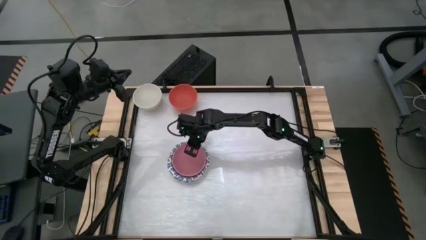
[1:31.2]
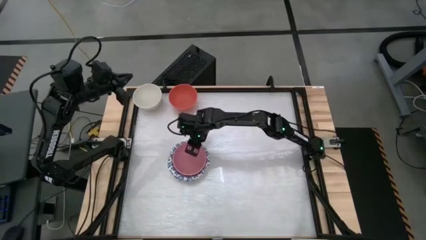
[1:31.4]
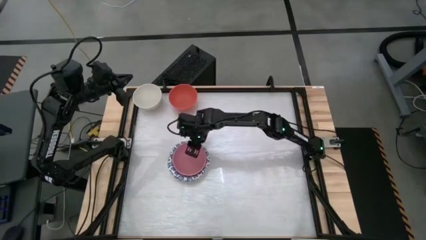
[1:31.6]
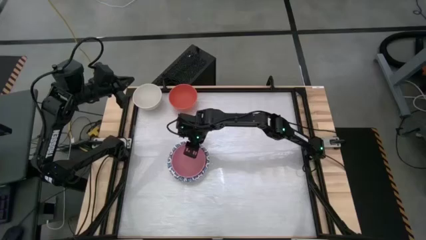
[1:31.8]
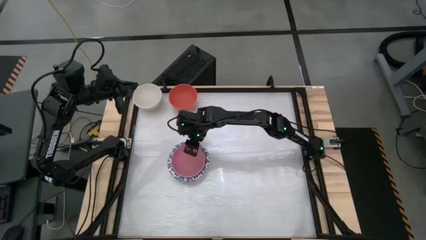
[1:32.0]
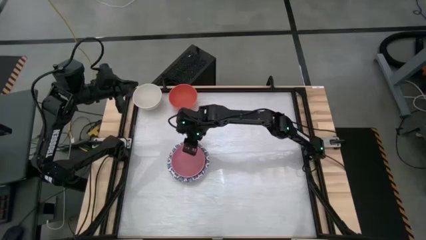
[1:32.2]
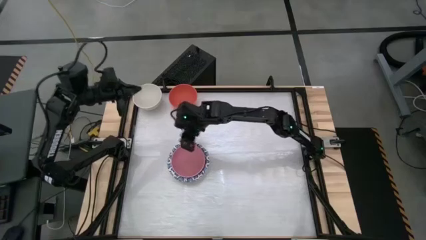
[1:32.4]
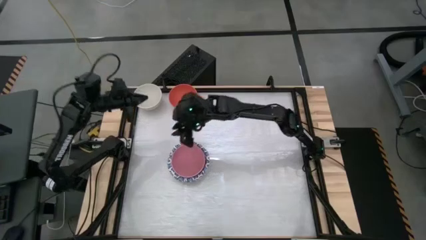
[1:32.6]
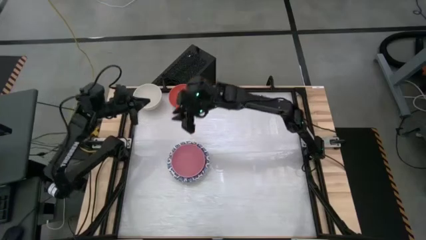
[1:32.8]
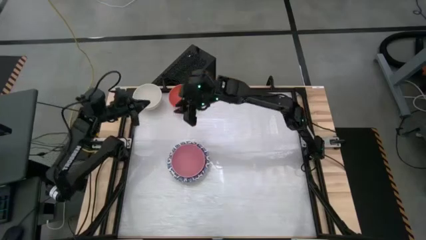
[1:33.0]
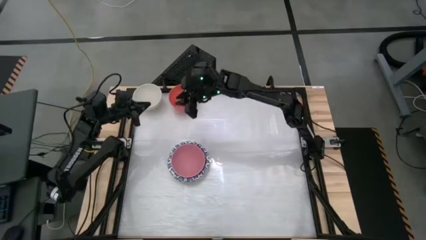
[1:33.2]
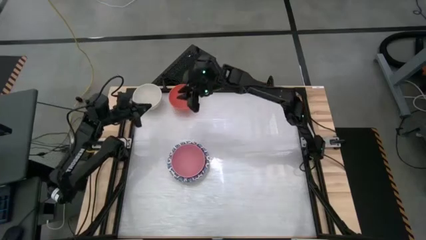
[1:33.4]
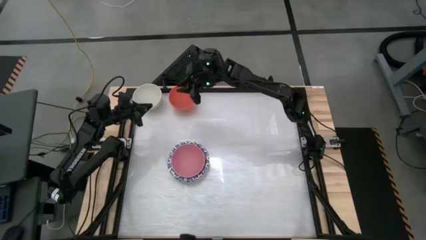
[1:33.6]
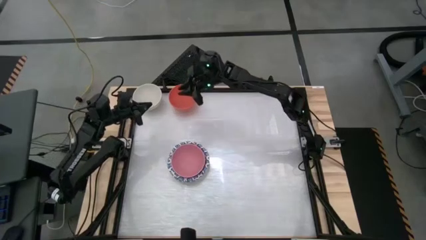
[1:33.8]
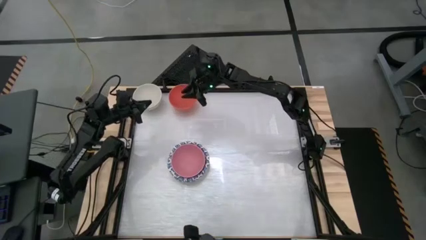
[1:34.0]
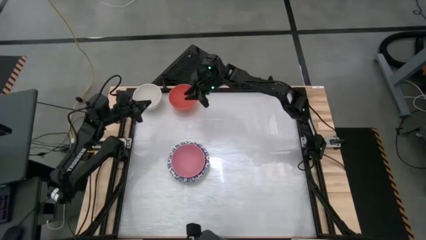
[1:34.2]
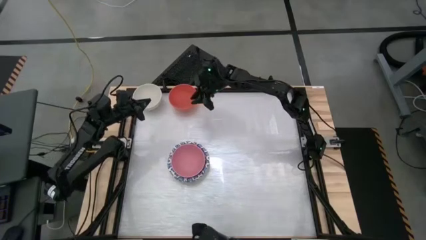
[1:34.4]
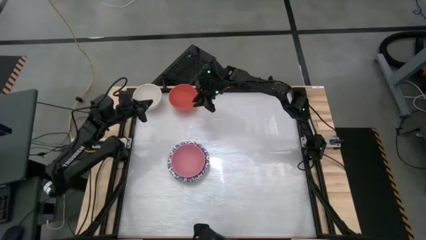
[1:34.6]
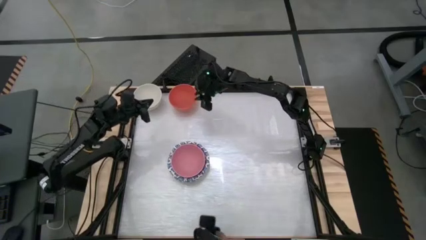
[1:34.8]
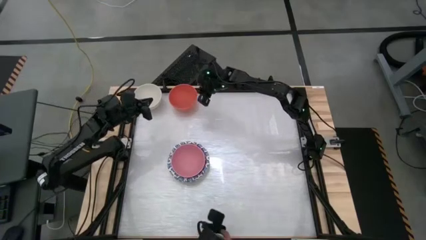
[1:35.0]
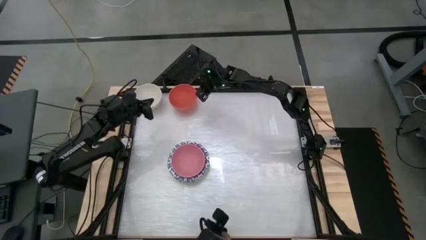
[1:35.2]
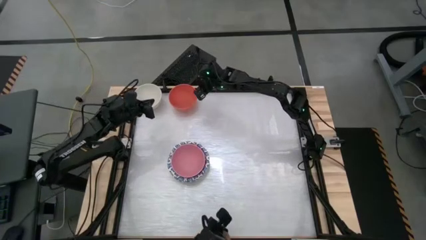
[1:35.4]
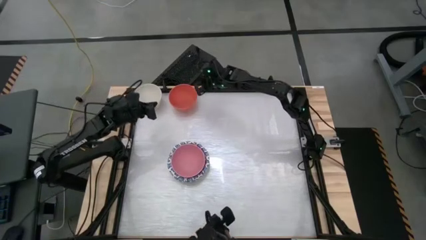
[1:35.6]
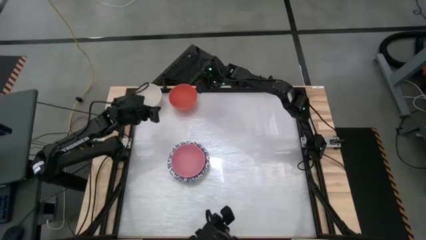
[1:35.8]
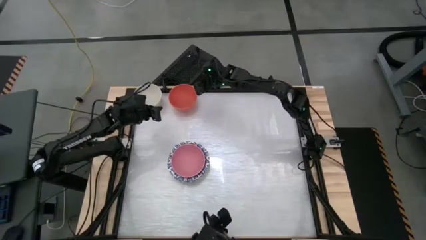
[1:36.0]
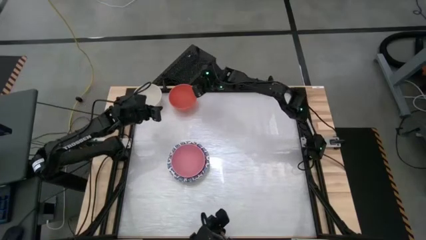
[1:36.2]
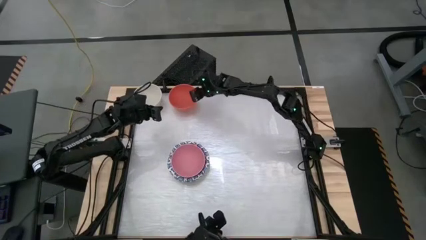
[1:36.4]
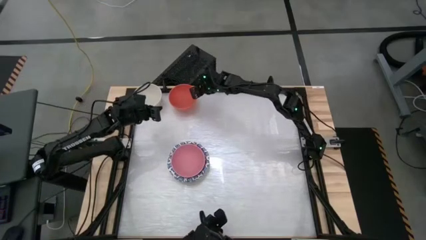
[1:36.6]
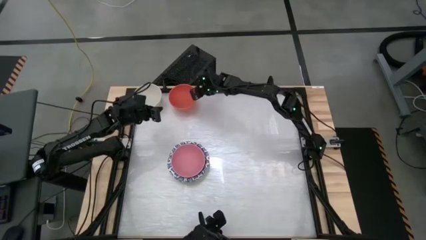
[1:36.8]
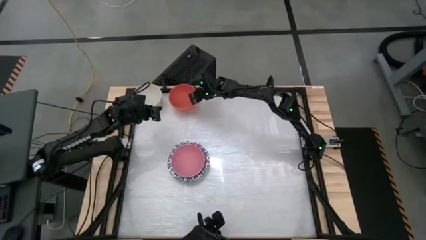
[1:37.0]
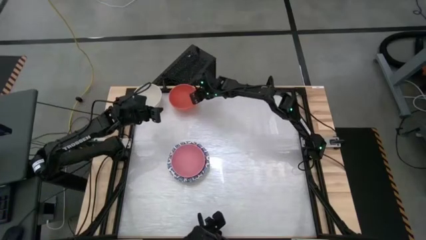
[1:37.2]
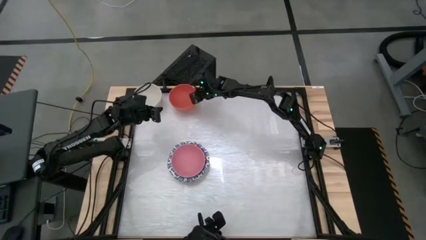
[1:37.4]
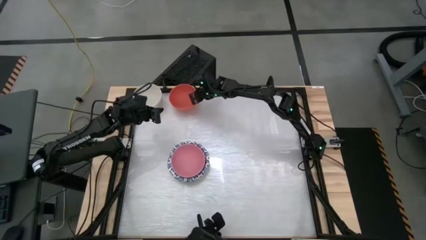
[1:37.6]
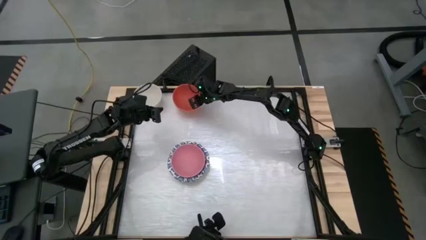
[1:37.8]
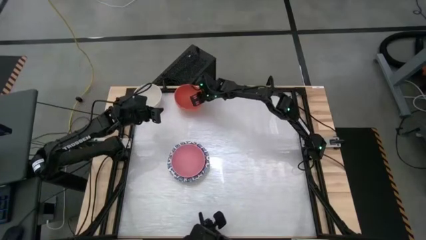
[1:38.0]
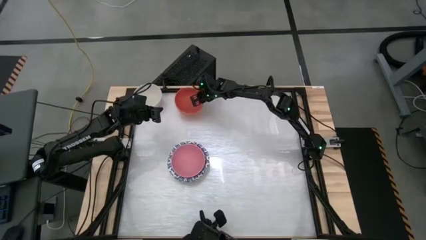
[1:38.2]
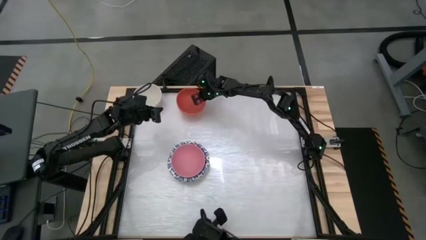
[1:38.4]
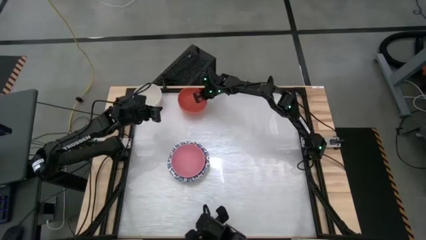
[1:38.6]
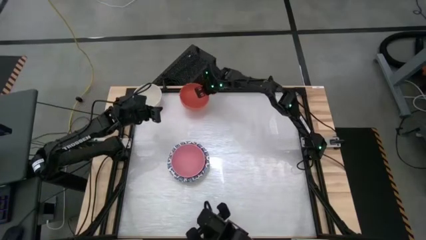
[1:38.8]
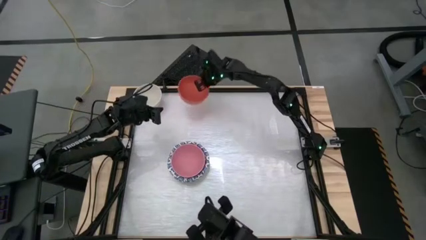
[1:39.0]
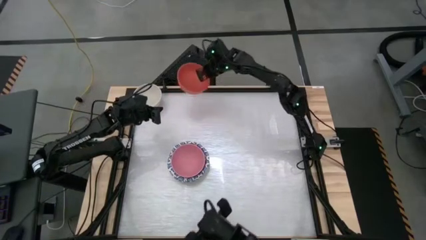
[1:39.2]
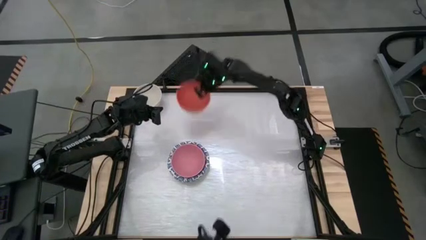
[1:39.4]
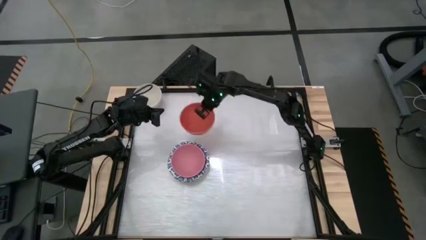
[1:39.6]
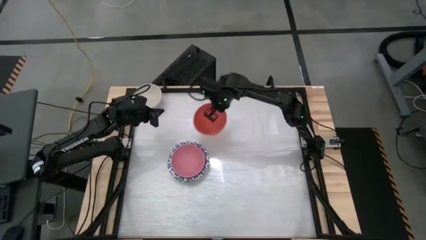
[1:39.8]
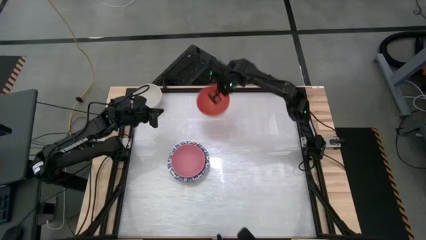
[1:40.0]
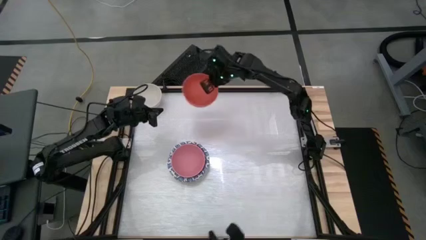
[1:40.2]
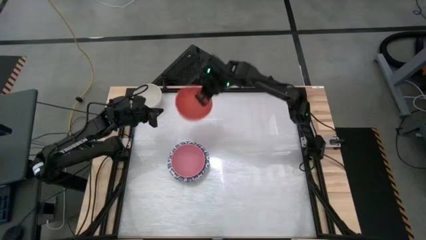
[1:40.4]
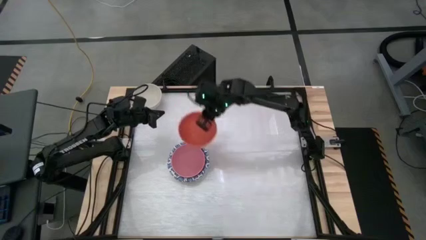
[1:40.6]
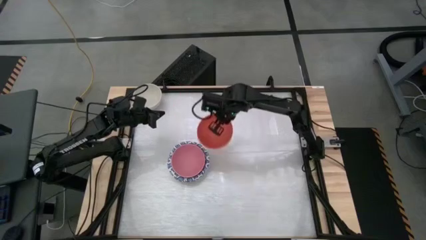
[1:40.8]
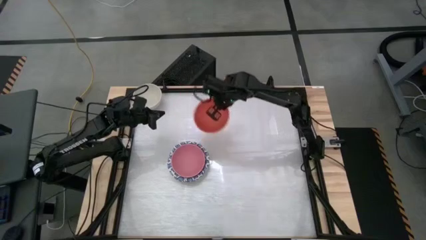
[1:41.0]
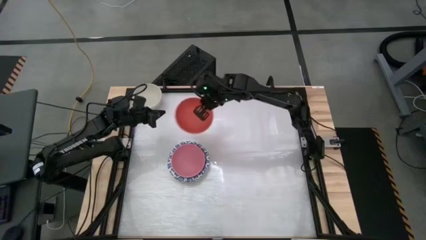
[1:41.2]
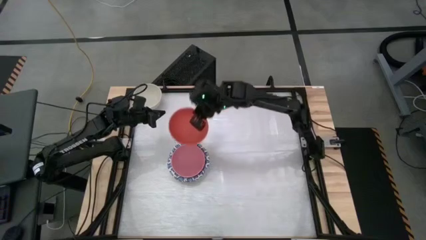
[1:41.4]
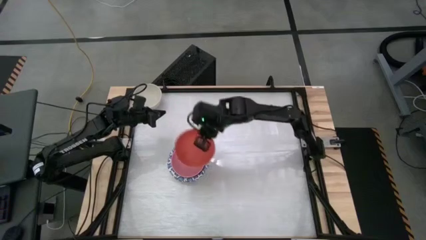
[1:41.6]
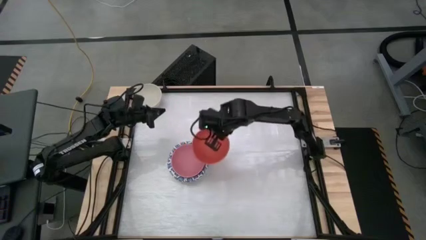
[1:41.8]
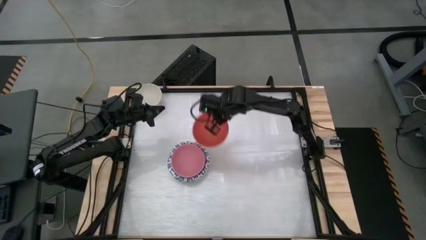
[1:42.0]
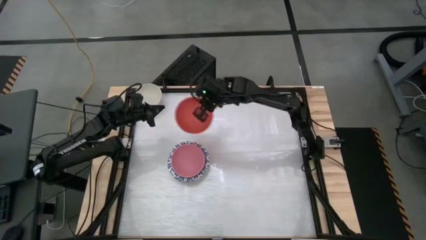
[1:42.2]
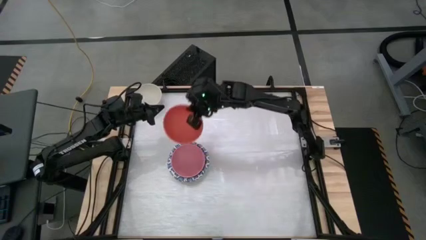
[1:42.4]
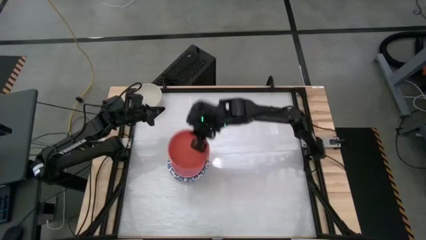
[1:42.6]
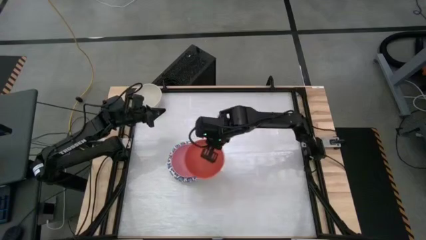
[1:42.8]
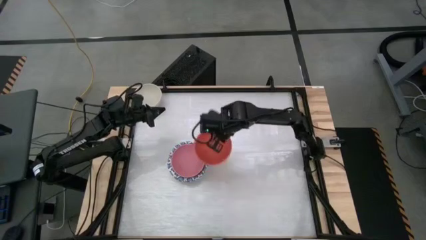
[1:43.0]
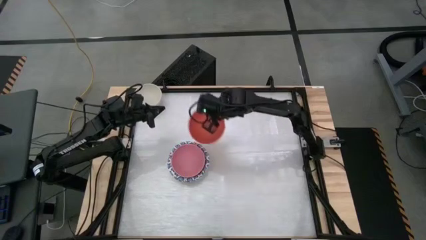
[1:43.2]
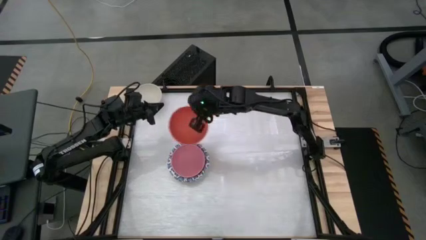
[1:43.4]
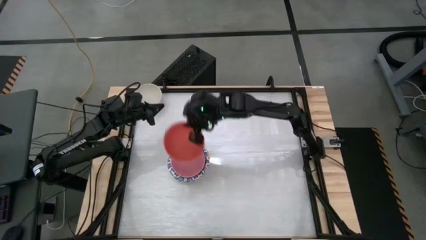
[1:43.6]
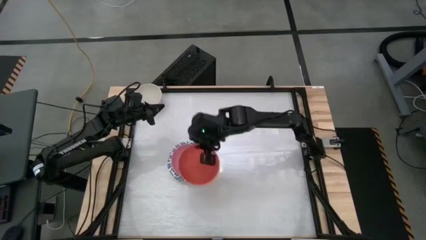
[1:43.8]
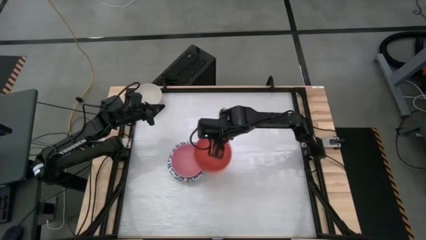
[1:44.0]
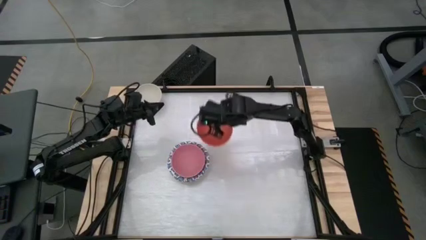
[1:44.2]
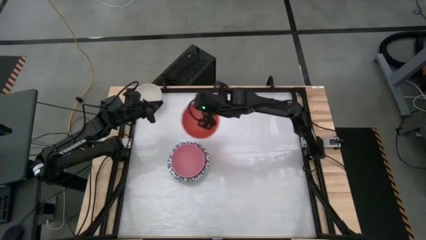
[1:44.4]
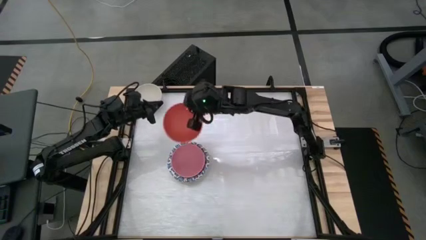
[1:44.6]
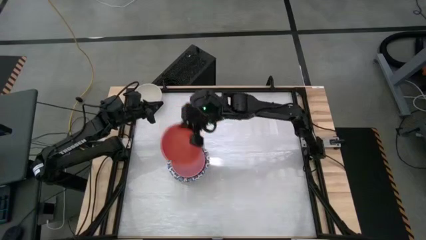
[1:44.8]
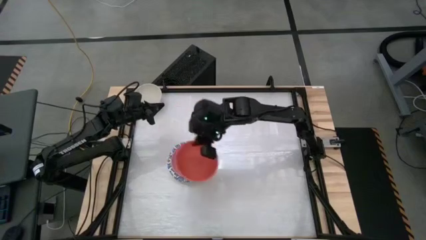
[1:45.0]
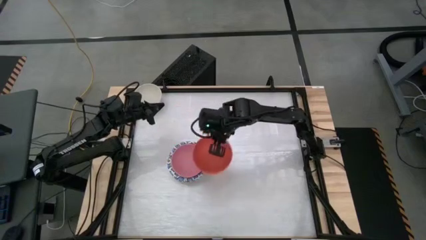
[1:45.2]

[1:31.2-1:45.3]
Task: Nest bowls inside each other by size order
Stack the orange bowl on top of the pink bowl

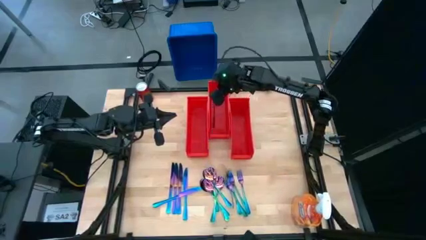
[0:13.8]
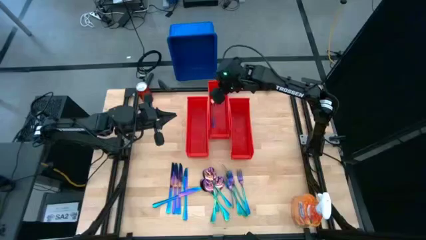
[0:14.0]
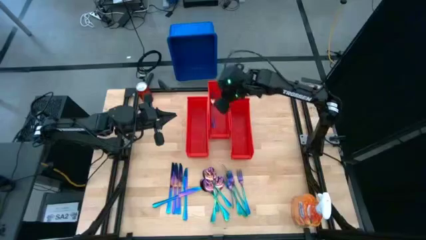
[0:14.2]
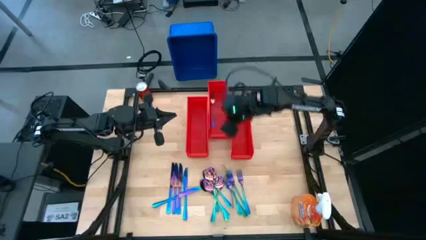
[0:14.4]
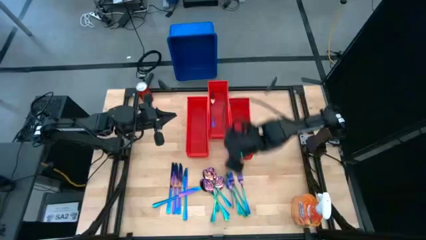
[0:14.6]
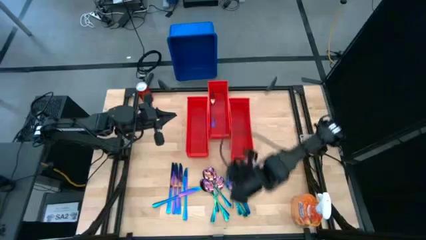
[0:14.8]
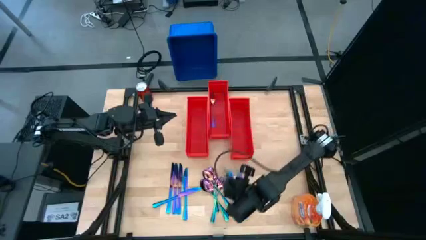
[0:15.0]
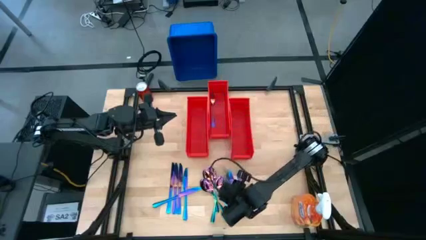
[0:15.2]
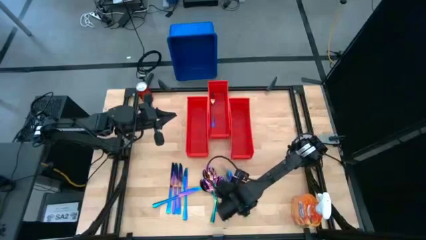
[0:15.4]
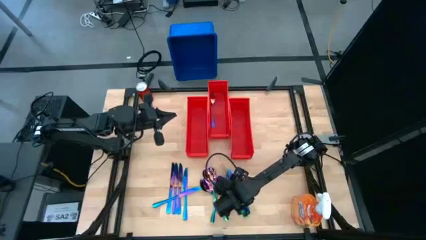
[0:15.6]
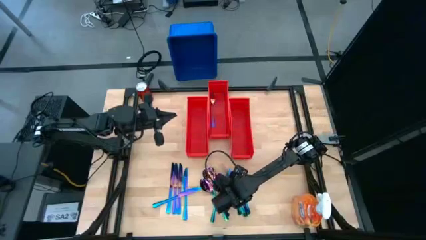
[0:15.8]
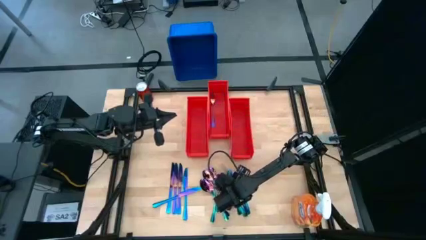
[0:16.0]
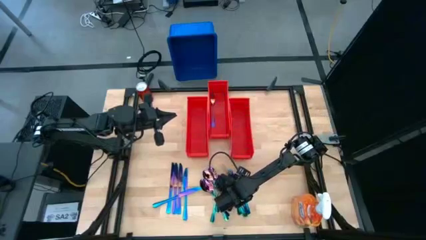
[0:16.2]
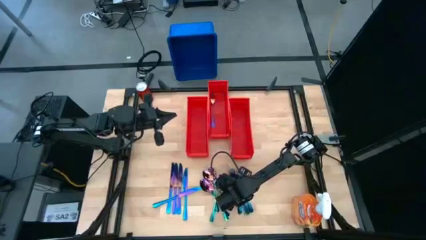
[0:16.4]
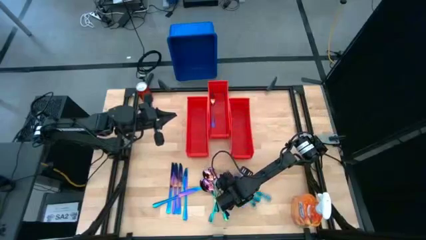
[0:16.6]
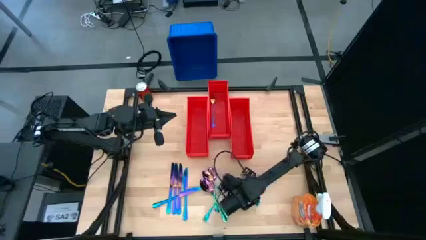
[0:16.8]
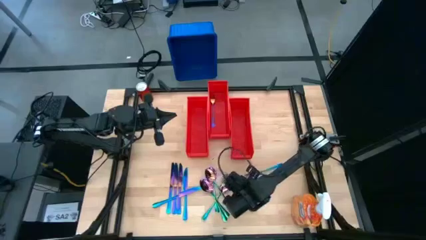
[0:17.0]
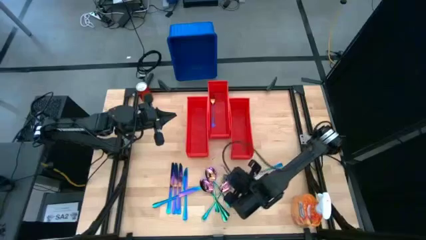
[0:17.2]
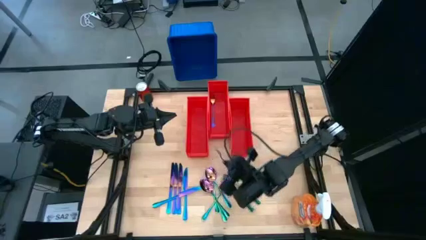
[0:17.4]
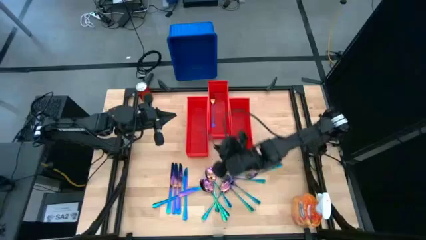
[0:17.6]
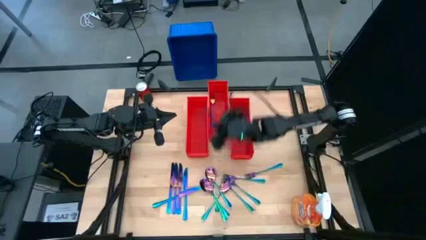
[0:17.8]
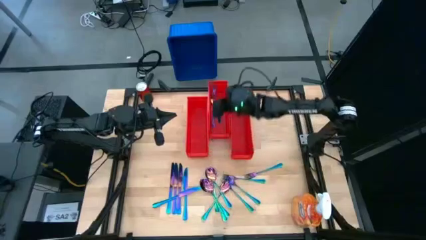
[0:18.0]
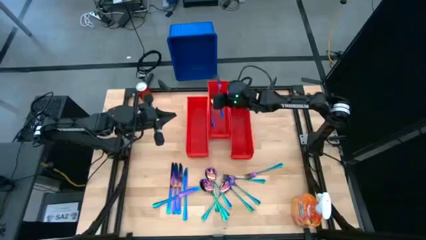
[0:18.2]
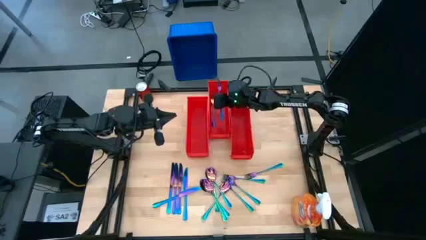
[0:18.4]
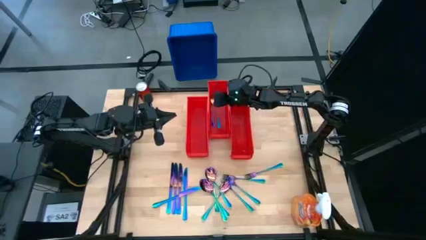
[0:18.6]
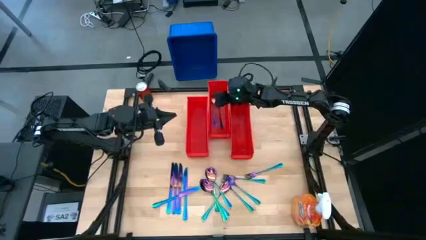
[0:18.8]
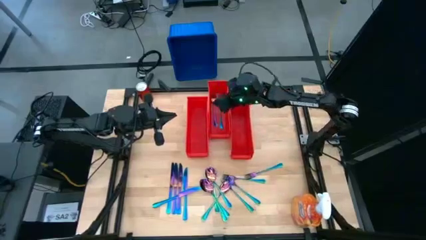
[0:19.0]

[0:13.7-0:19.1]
Task: Sort silverware
Put the iridescent fork into the middle orange bin
